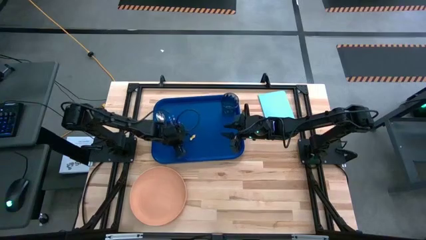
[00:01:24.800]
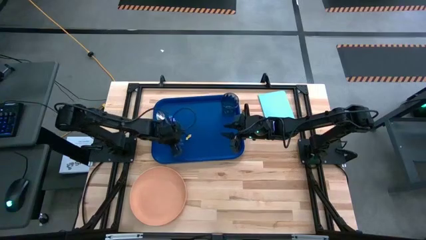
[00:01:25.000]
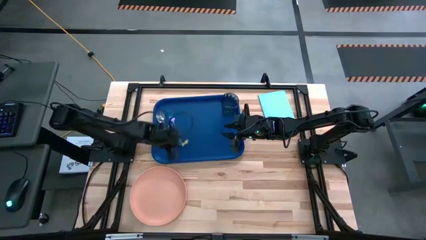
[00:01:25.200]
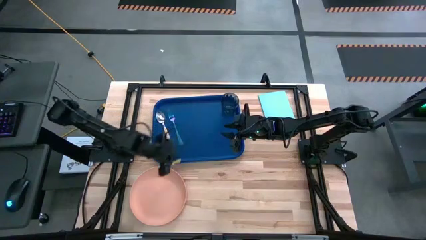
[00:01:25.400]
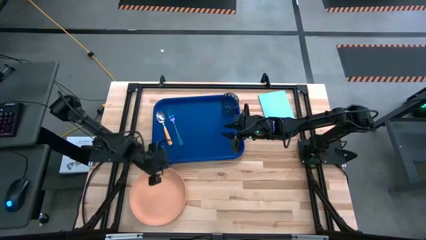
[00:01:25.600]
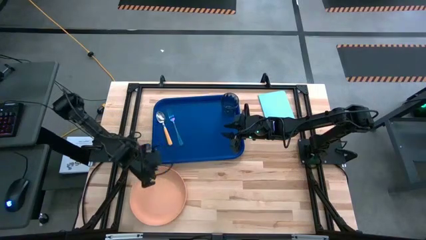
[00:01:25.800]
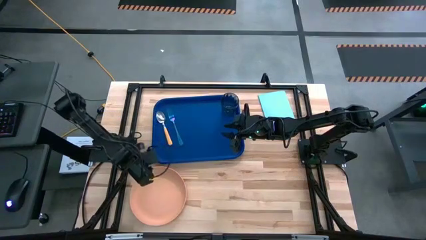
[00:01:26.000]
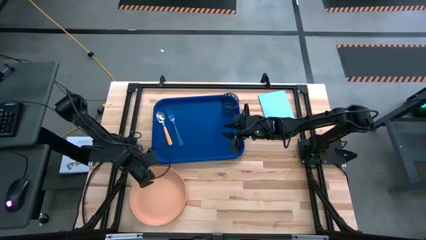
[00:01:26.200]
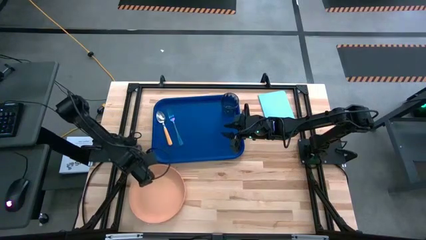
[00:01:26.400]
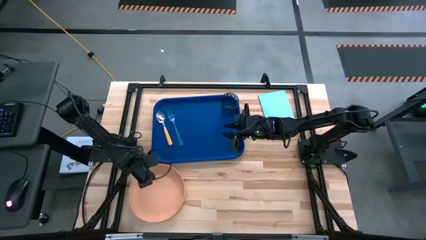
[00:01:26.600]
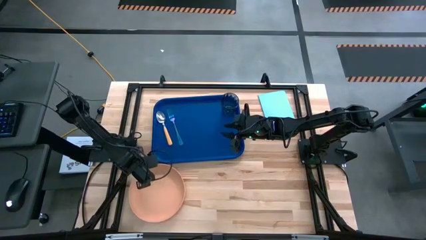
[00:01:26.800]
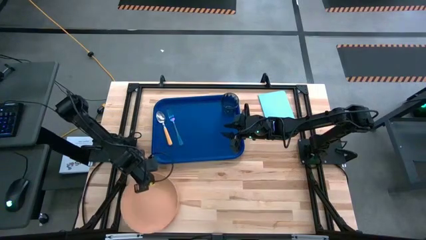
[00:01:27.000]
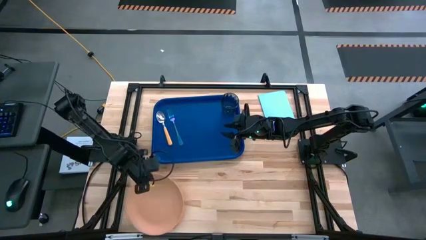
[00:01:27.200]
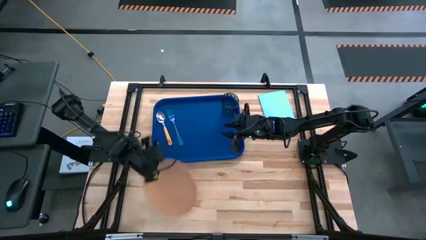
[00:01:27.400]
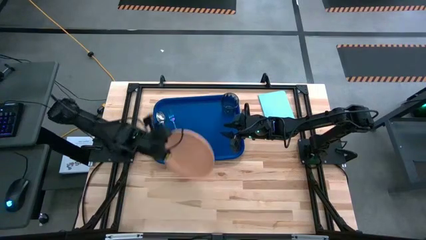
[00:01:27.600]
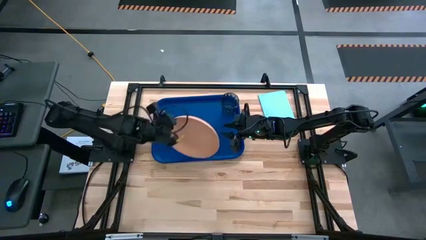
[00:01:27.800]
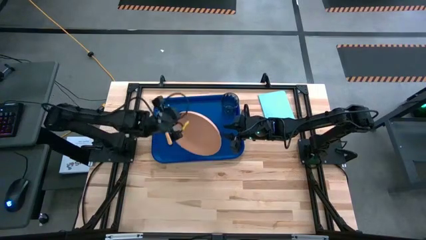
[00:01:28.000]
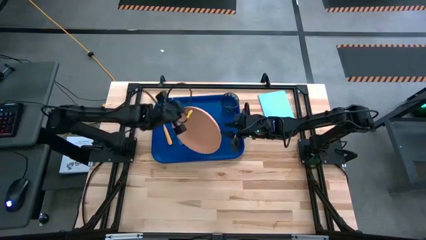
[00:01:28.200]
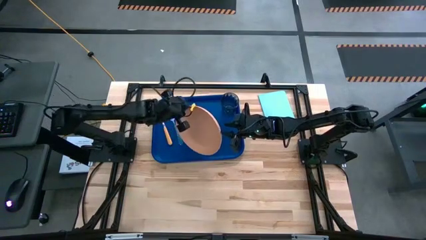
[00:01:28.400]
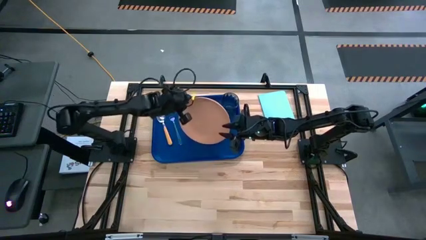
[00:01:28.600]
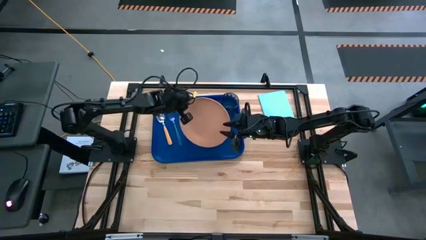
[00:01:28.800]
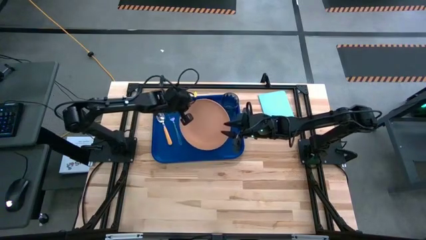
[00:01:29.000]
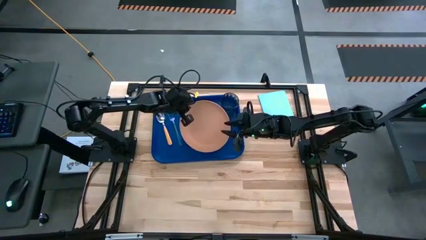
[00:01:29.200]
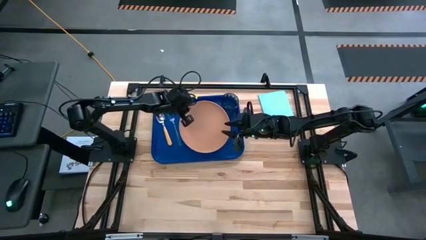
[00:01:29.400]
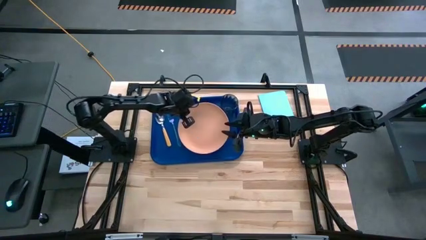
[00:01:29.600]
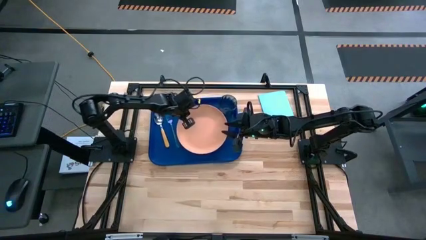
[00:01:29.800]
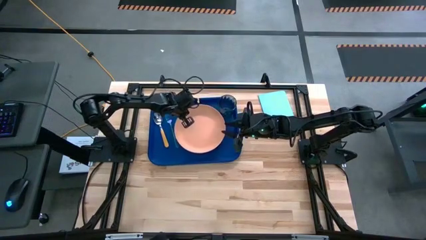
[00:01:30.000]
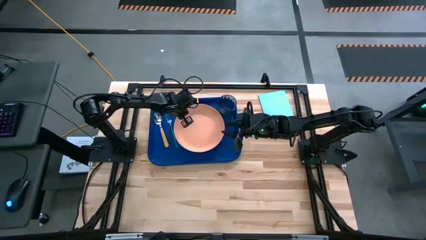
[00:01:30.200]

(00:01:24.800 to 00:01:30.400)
Task: Pick and place plate/cup/fork/spoon on tray
Put the orange plate to the right of the blue fork on the blue serving tray

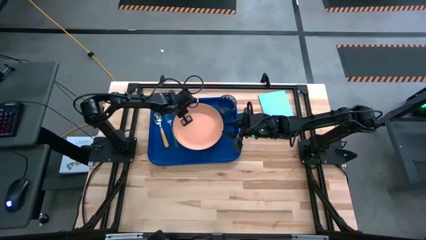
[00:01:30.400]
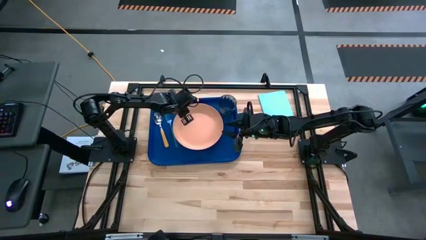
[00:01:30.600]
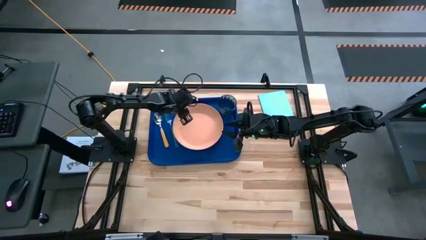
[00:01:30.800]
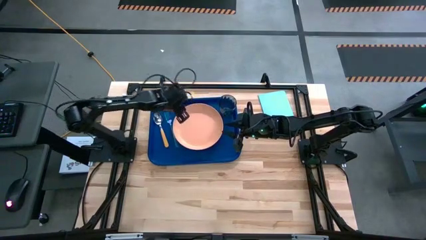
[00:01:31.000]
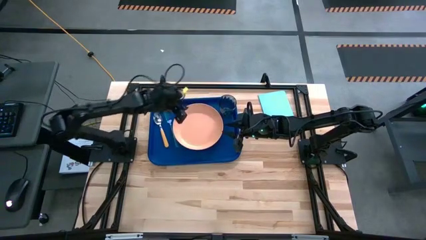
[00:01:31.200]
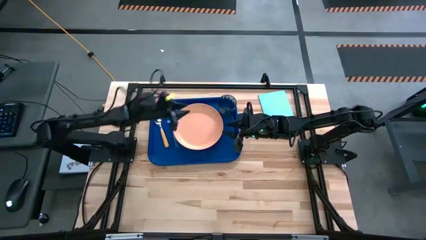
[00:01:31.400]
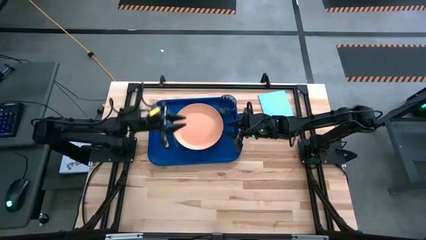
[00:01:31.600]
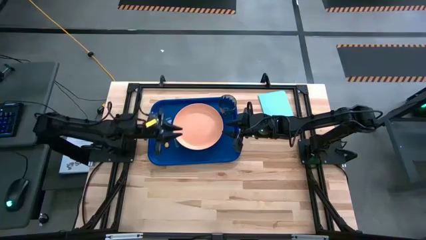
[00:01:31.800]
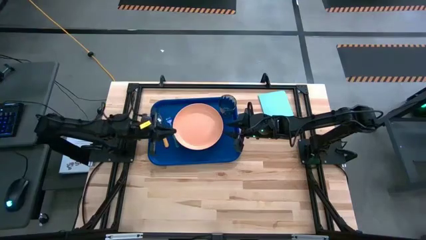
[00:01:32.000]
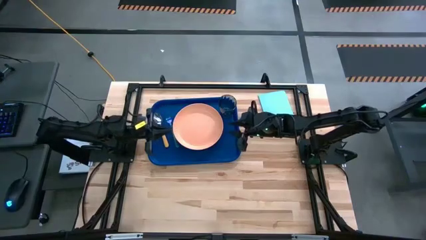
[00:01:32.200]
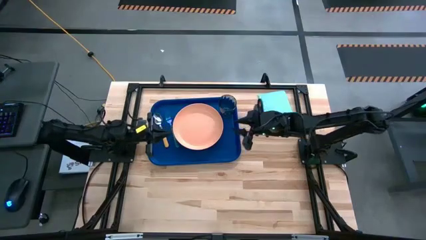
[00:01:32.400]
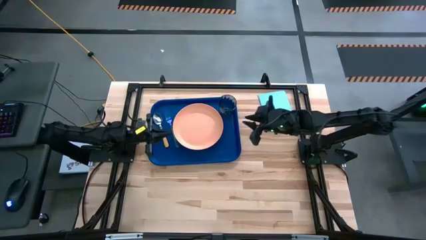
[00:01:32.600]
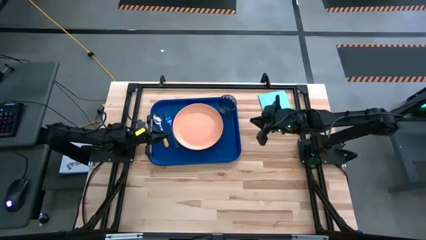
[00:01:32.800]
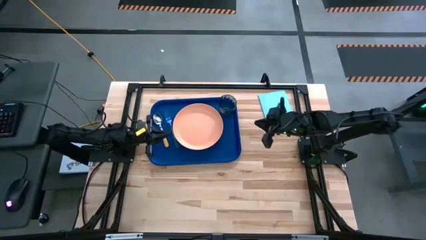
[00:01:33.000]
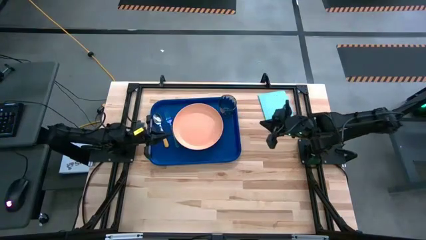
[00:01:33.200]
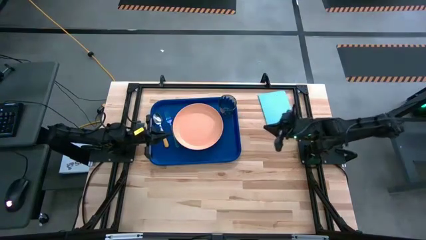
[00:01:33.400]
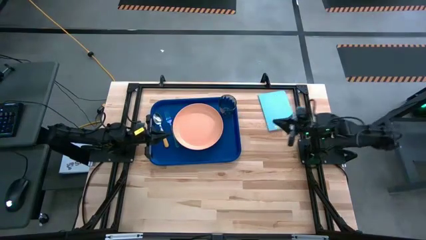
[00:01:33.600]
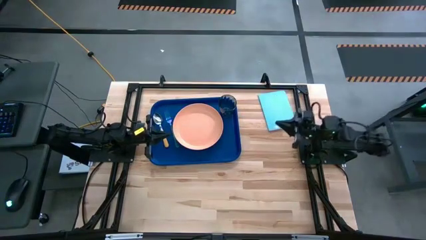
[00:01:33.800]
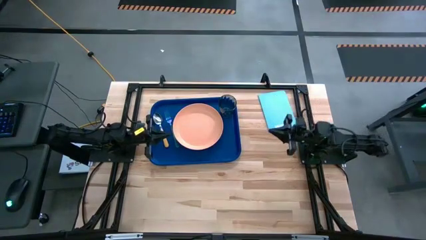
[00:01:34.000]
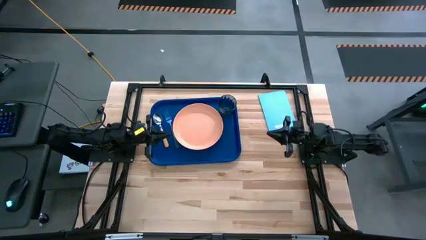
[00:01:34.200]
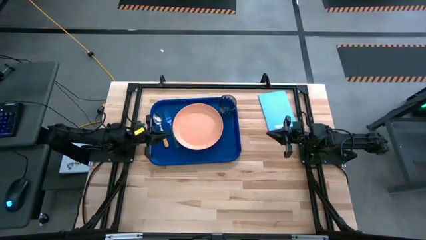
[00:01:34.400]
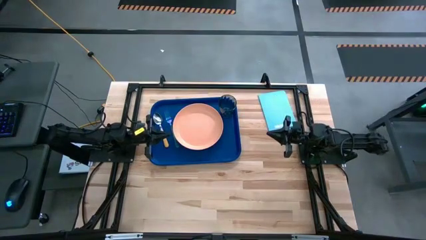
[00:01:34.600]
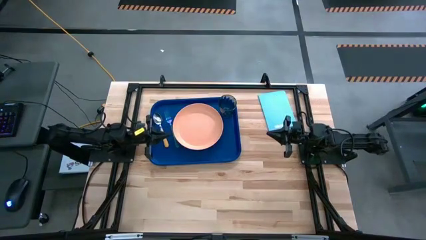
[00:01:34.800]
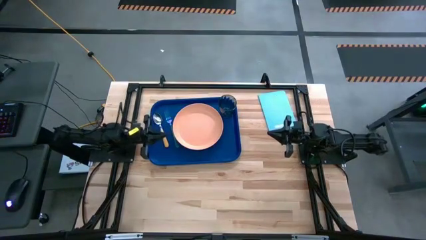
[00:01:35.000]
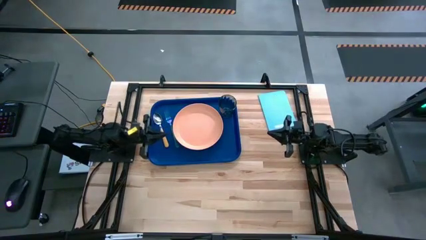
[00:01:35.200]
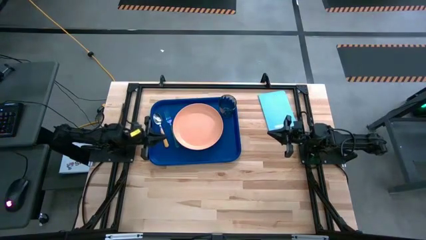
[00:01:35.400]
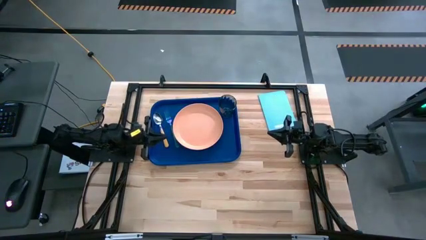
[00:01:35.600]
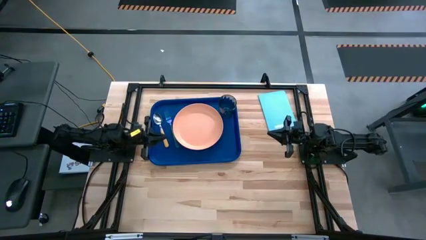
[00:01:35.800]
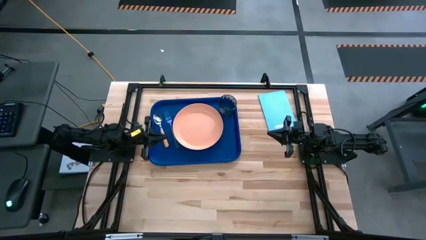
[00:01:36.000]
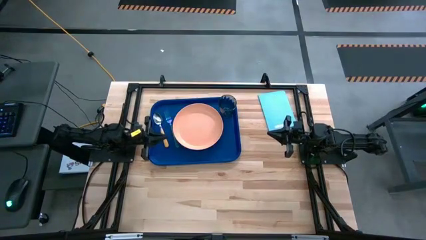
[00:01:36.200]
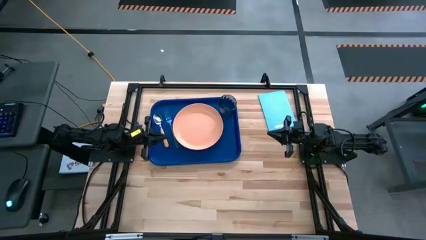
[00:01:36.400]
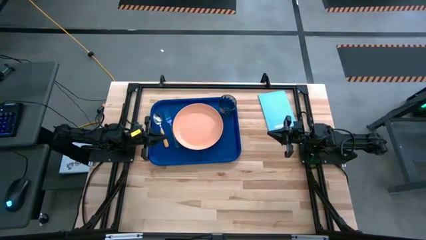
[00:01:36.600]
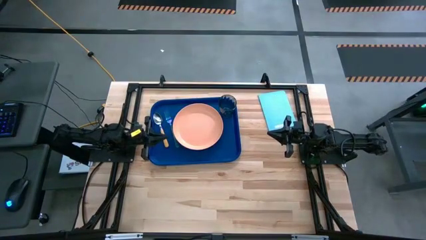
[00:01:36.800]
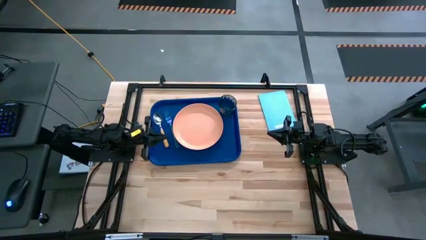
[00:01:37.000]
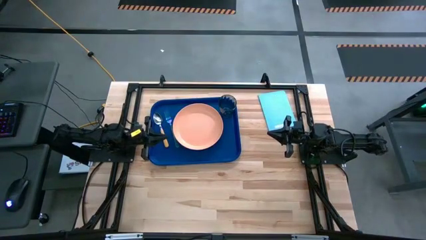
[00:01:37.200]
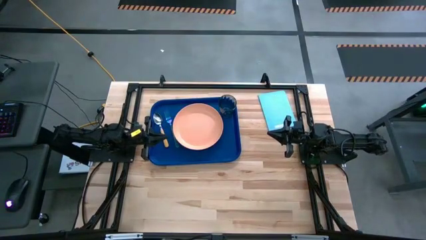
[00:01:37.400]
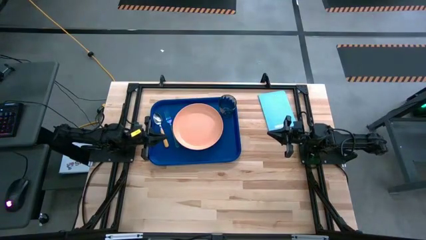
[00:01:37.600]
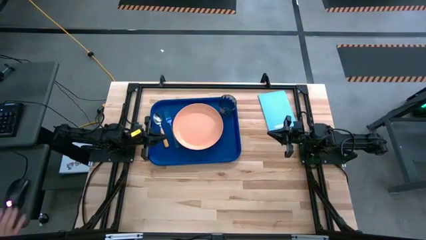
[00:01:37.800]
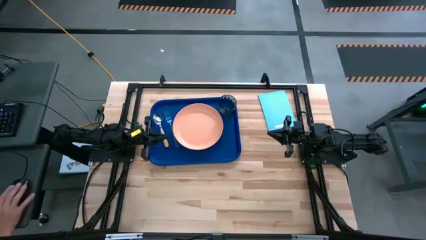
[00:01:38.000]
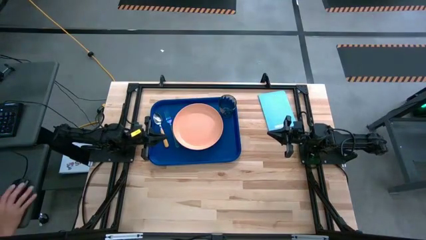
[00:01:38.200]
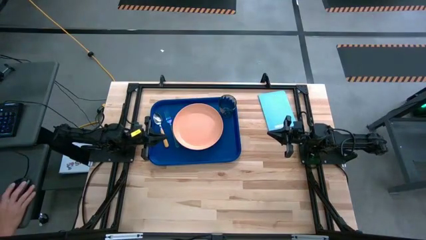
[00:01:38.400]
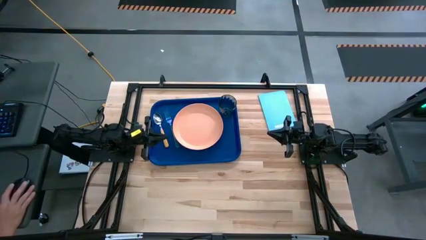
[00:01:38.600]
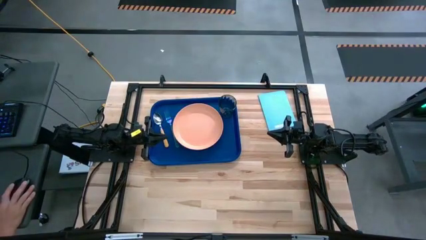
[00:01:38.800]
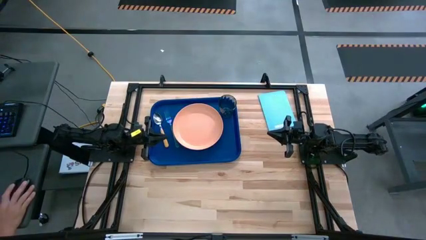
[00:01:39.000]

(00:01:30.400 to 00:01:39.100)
Return to Home Position

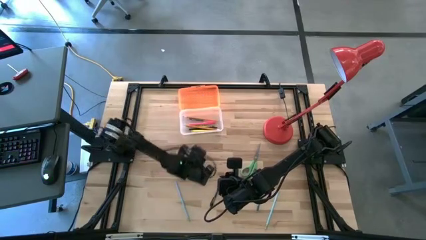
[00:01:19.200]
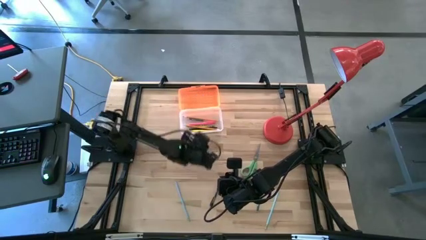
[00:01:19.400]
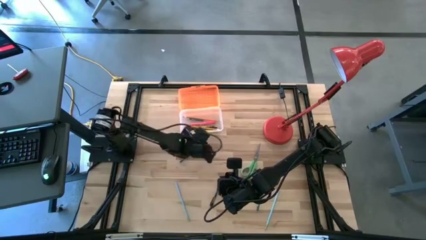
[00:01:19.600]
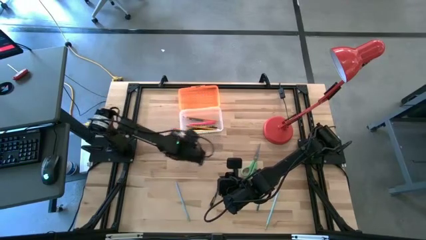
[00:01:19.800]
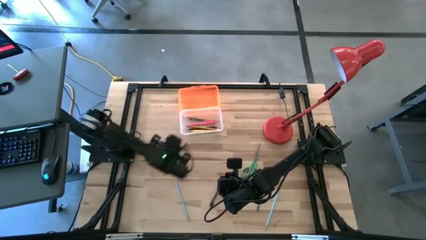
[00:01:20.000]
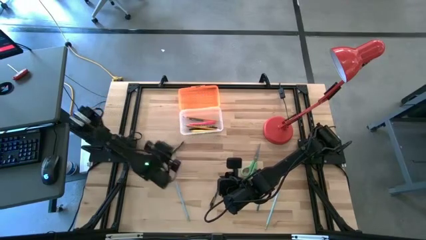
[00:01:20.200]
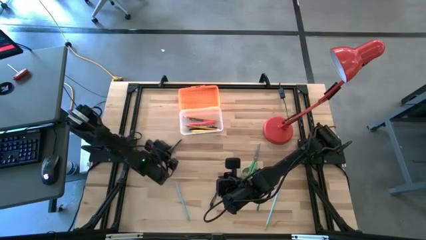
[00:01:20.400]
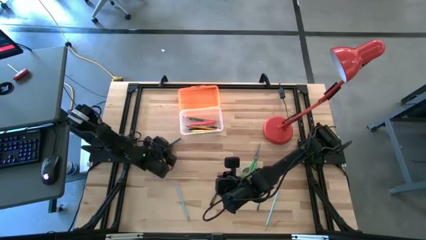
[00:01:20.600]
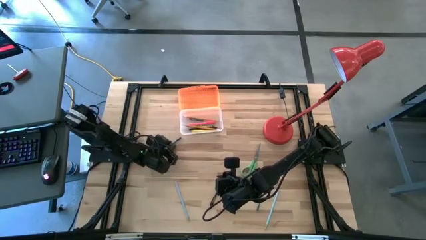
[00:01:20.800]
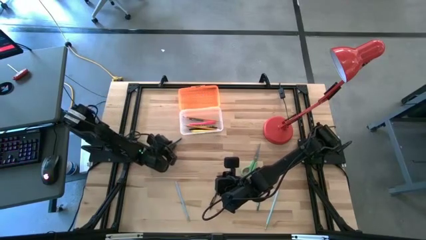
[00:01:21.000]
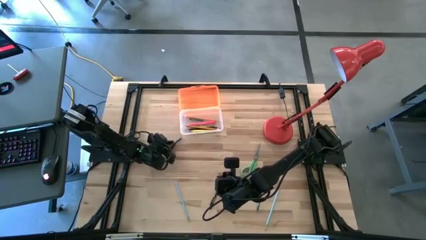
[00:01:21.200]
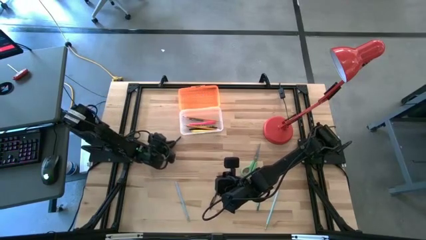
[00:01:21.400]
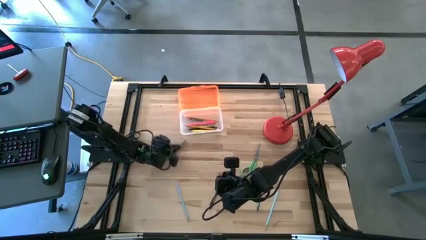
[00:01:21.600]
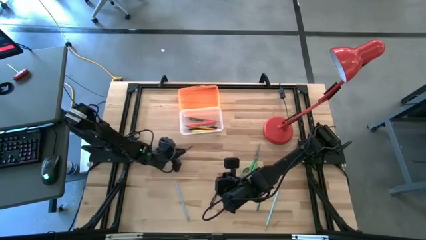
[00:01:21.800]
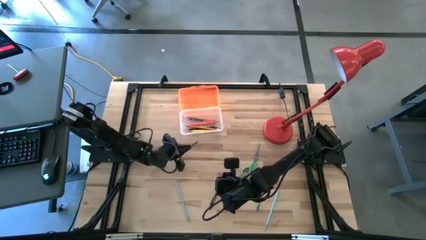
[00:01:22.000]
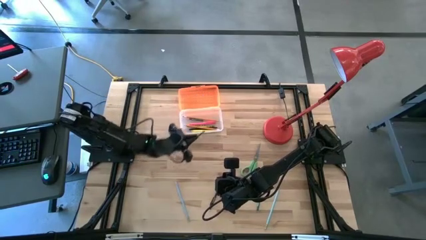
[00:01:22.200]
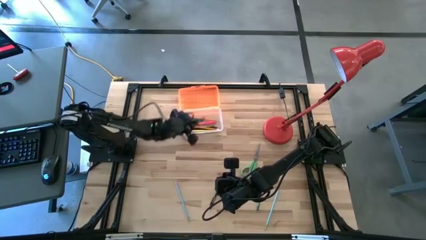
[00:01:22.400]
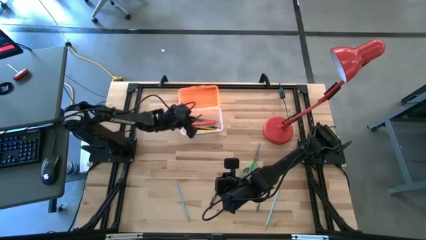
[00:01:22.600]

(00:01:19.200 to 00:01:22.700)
Task: Pick & place school supplies into a supply box
Put the top dark green crayon into the orange supply box
